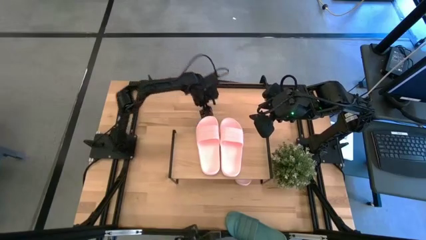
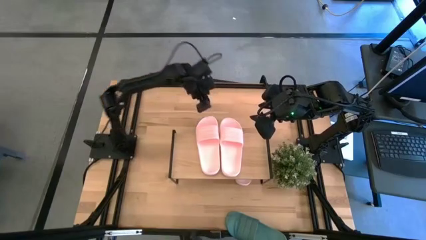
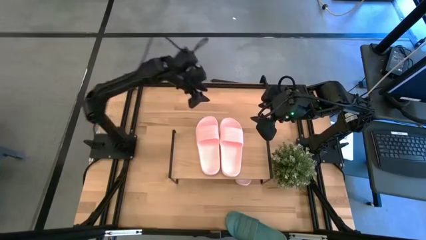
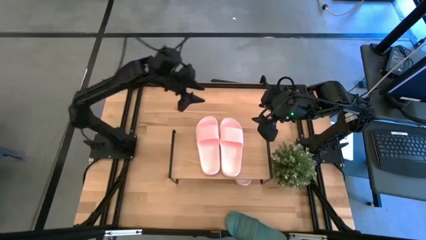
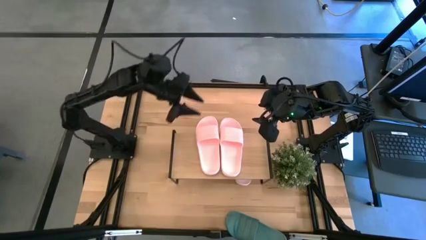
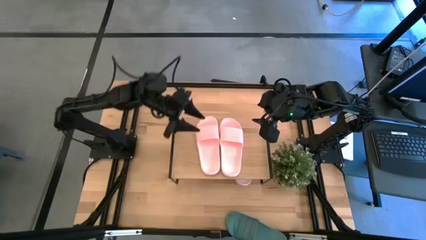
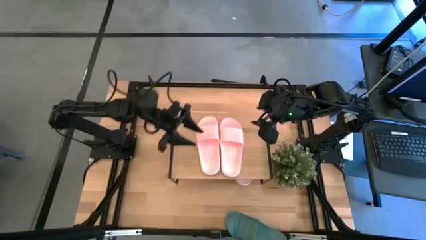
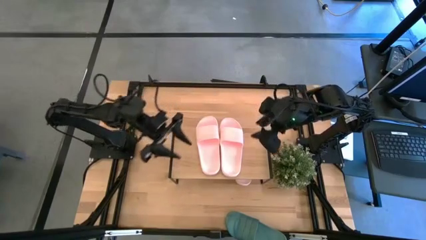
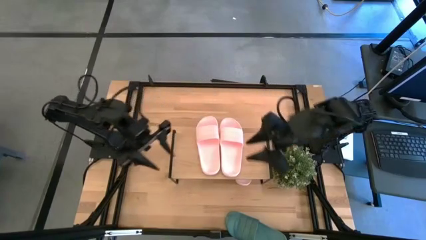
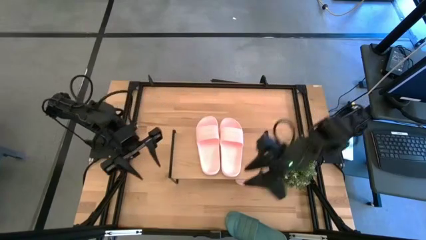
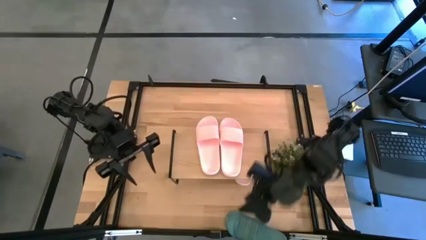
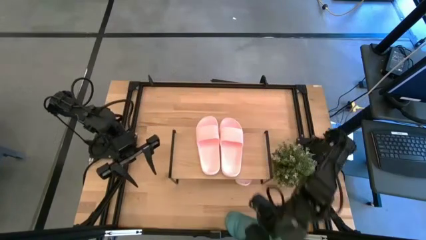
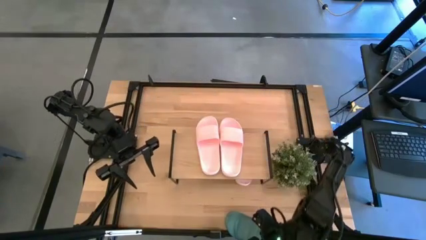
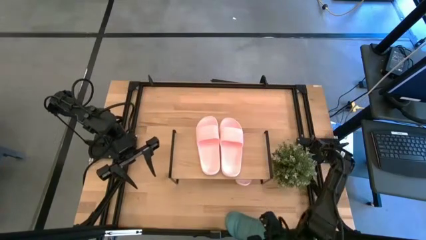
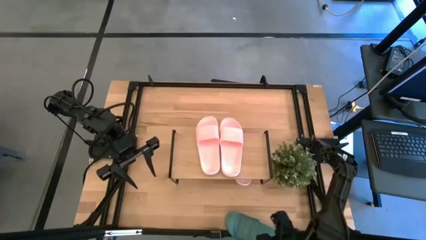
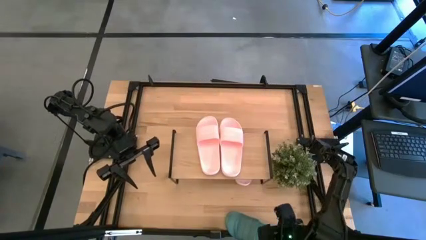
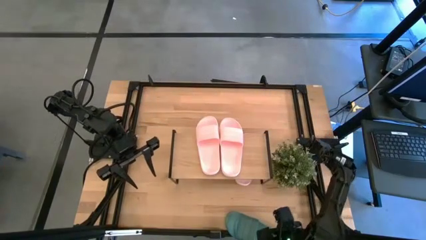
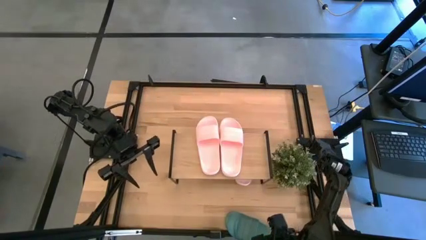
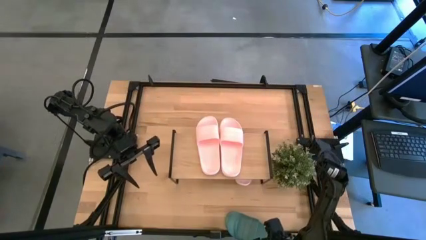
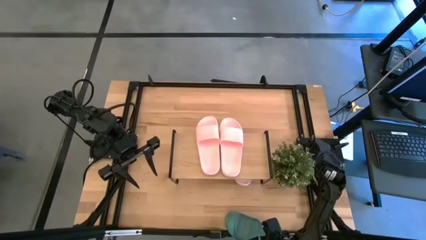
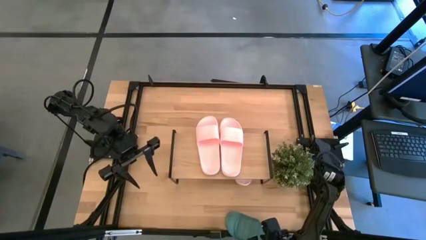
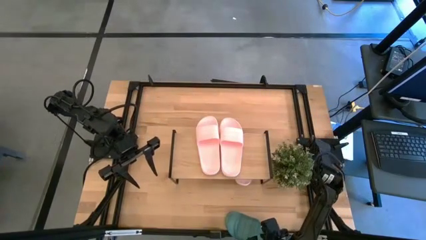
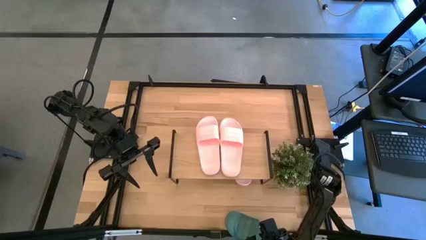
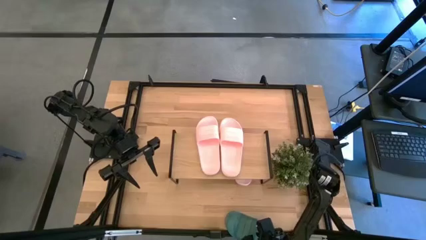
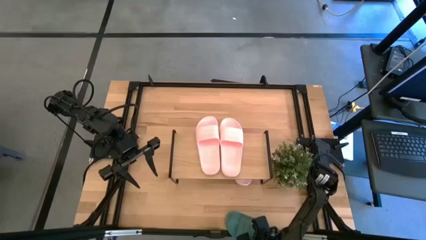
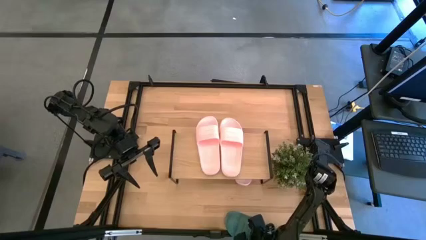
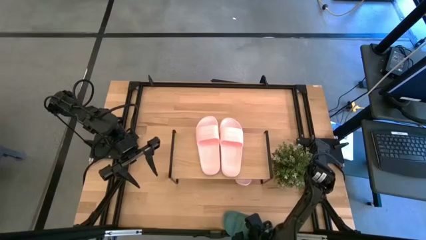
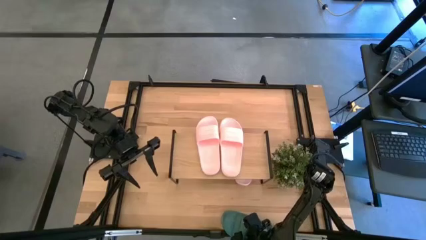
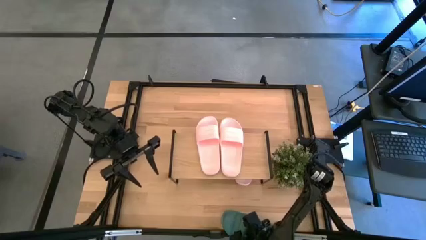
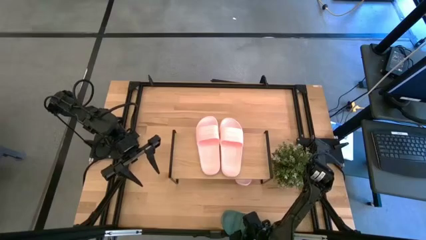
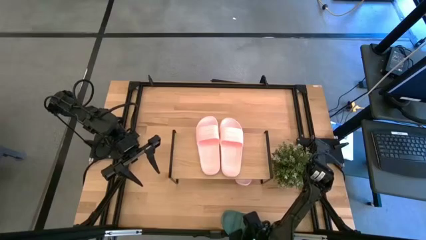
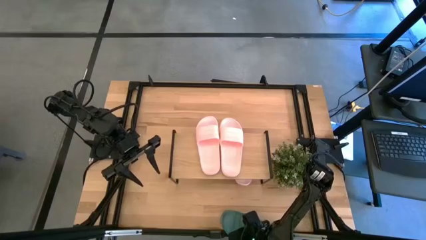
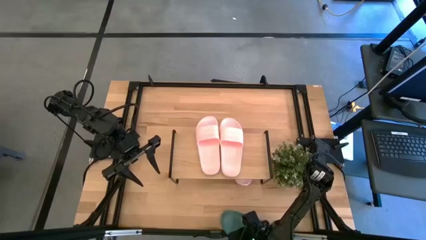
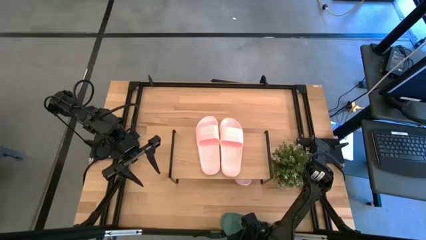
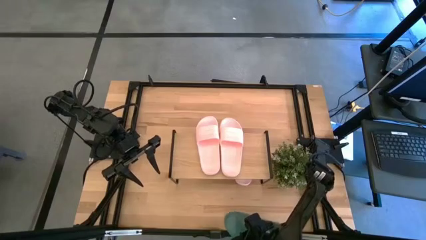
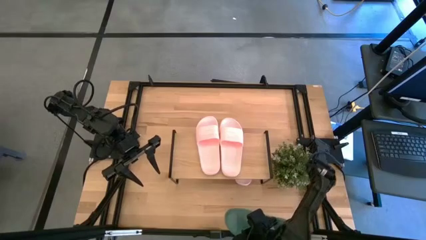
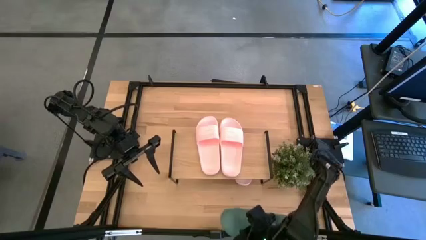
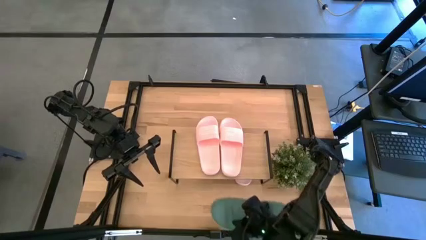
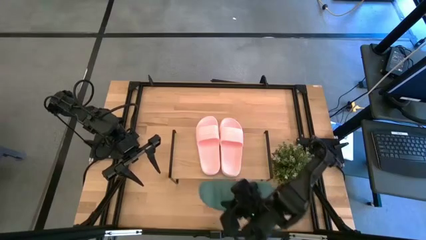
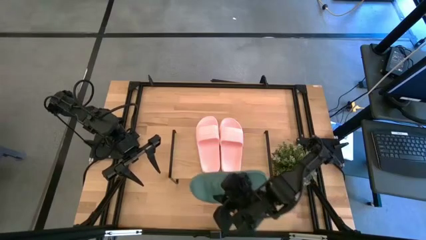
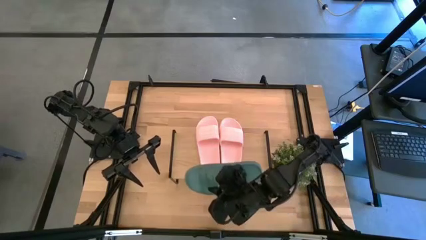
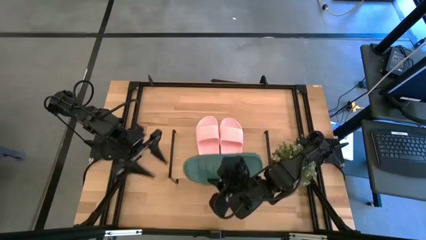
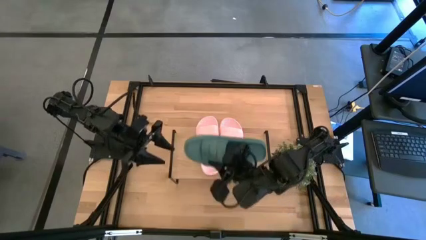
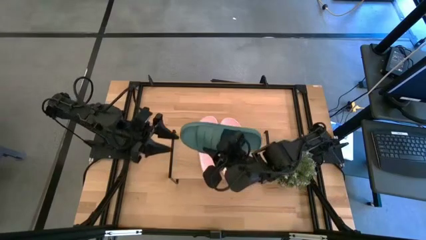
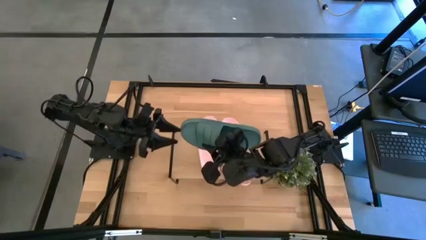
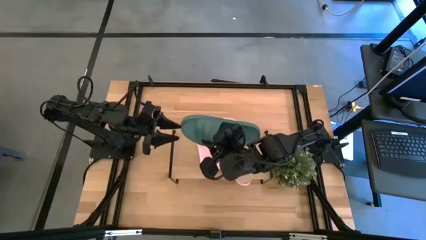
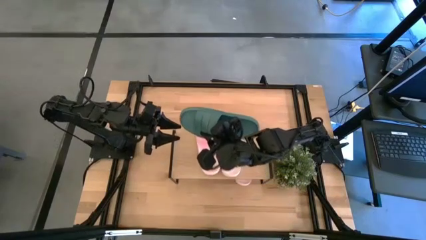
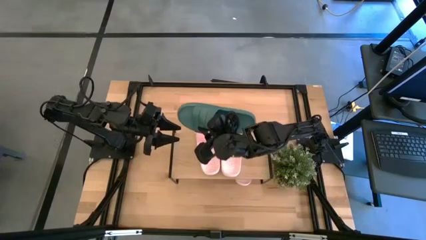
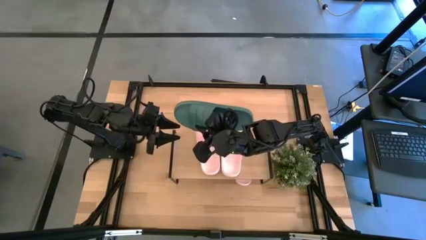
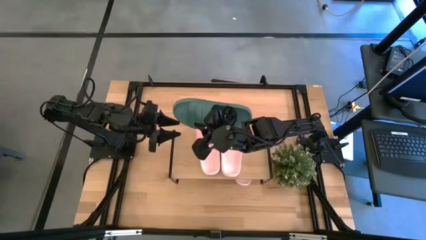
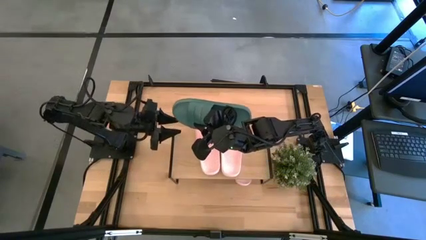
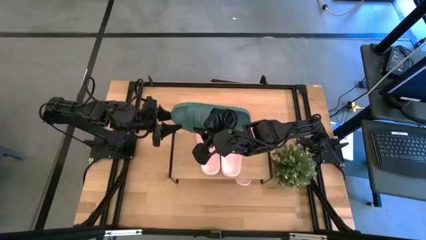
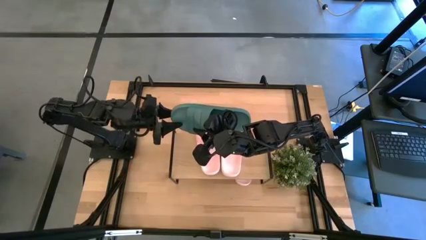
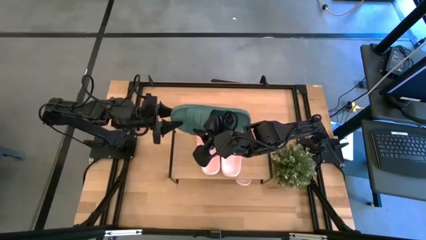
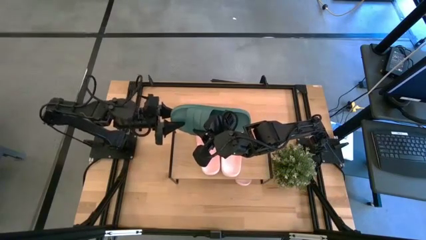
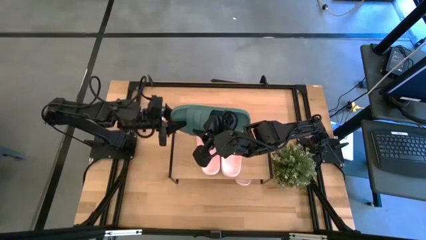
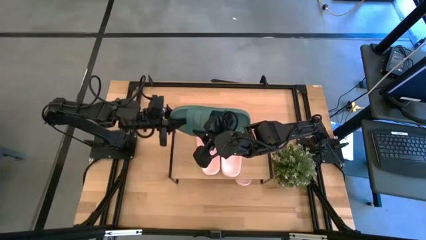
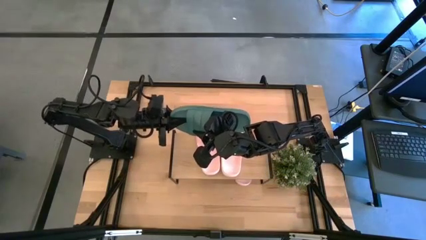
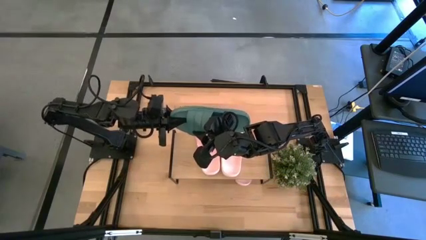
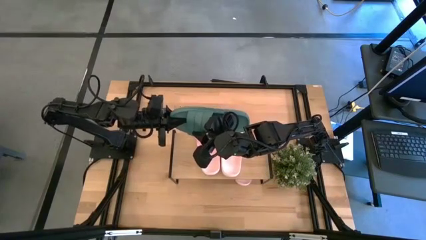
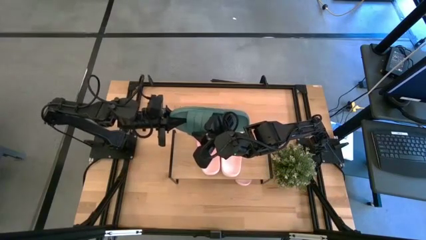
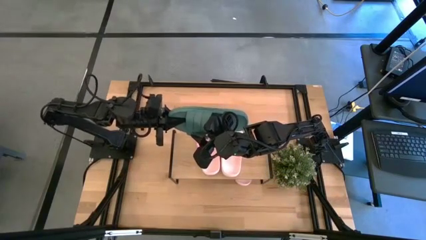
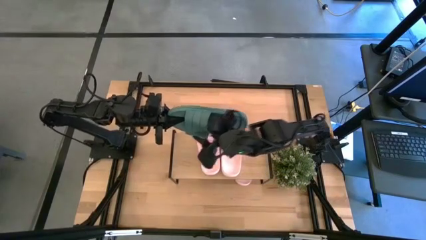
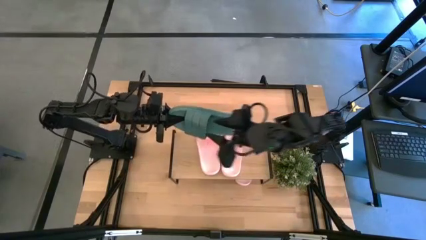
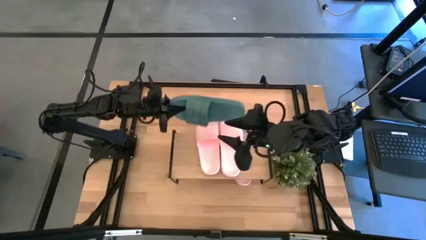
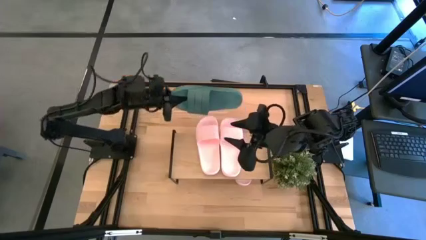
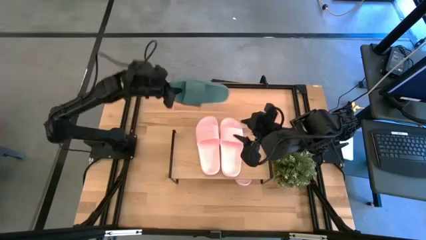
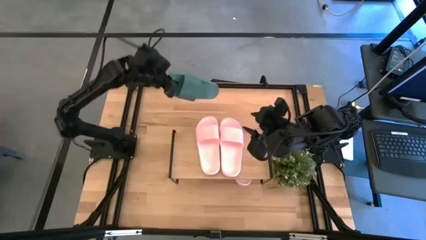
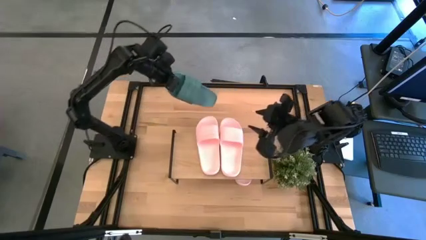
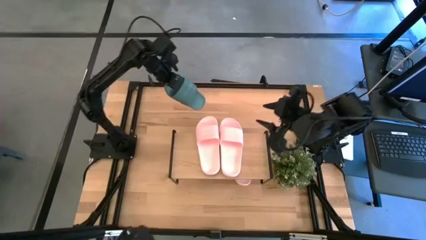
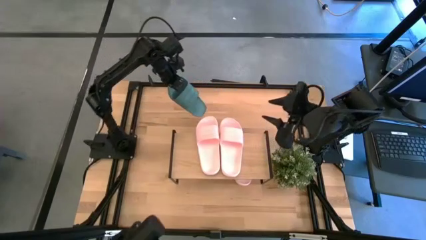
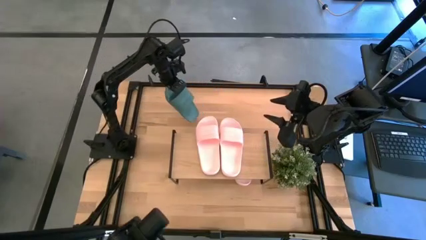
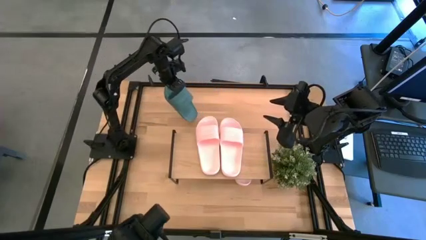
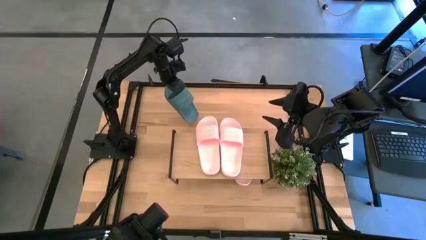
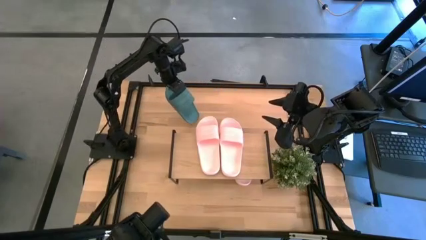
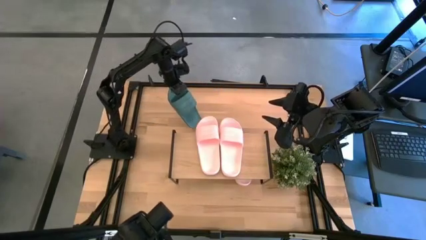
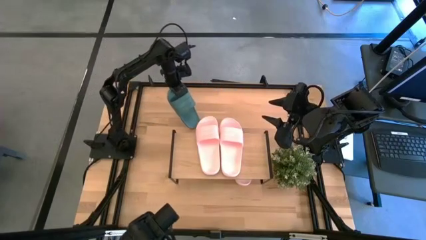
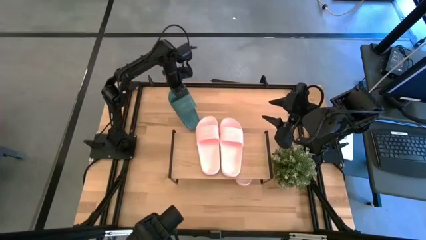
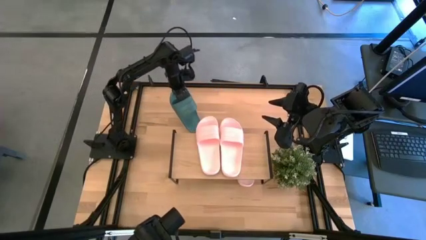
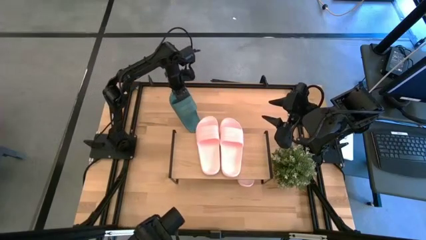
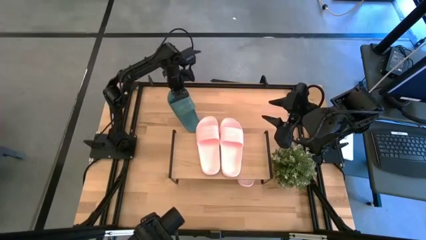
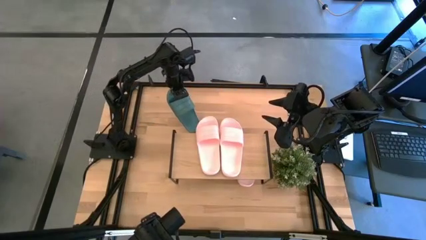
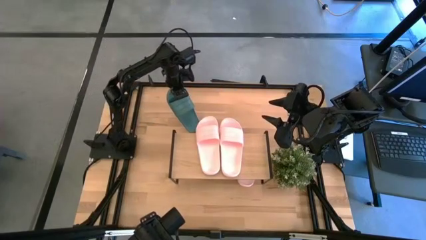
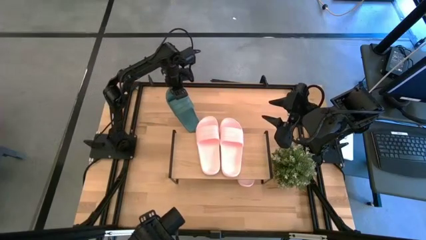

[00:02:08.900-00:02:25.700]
Task: Pick and place slides into the shelf
Put the green slipper under the shelf

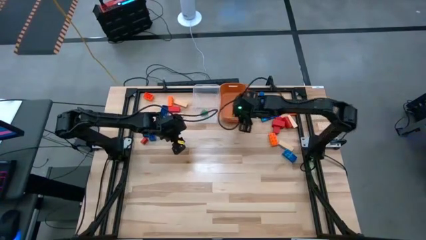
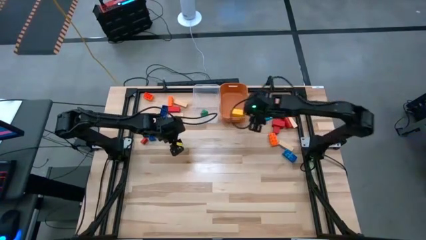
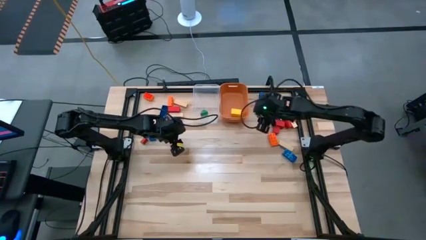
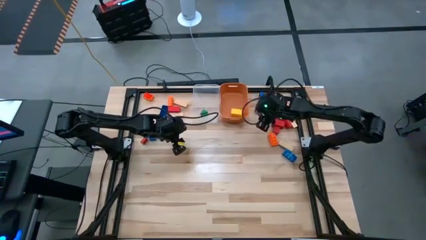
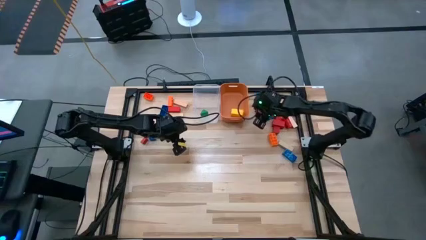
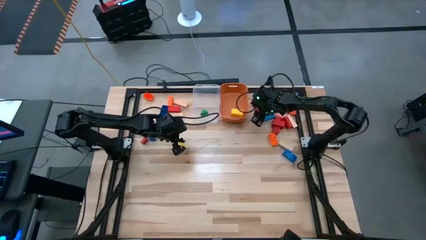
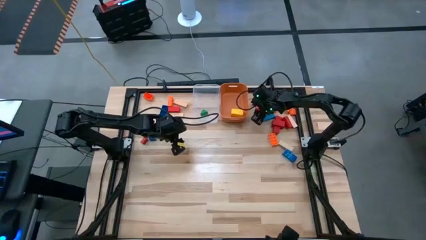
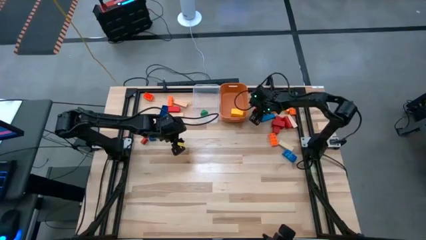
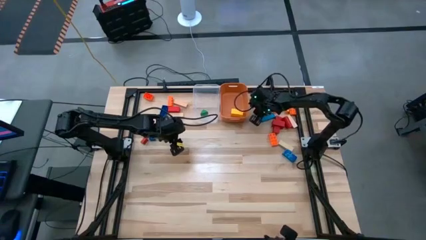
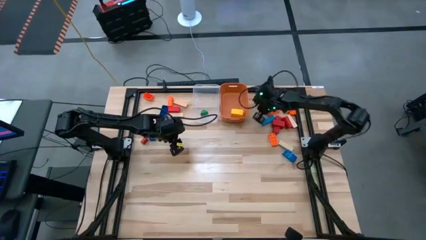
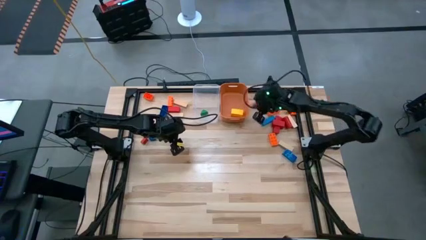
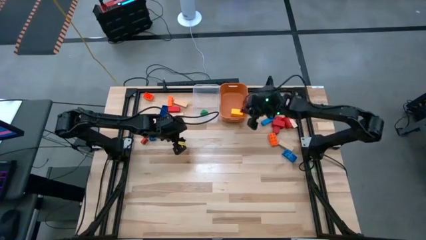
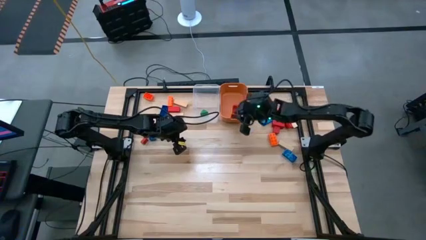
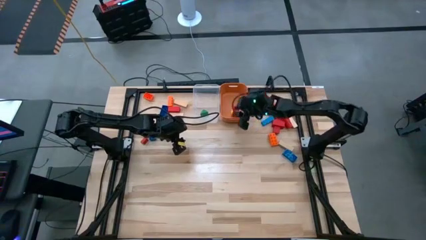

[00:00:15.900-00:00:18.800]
Task: Sort blocks by size
Put the red arch block into the orange bin
